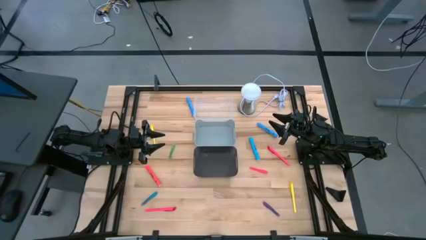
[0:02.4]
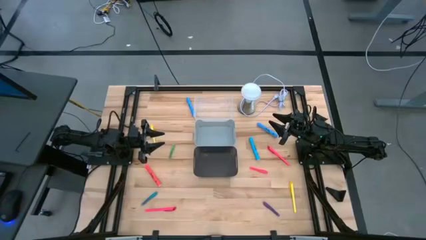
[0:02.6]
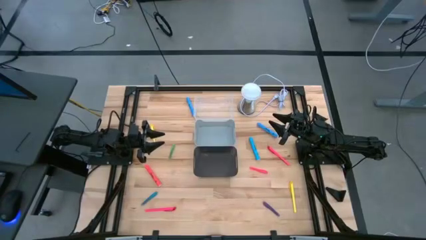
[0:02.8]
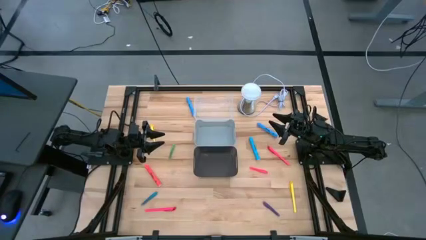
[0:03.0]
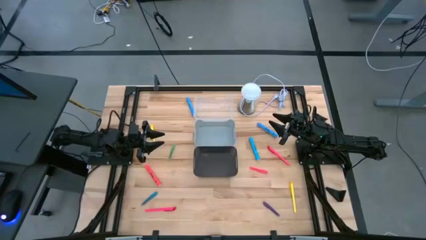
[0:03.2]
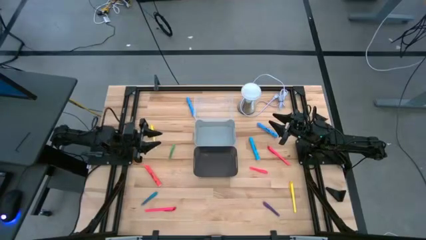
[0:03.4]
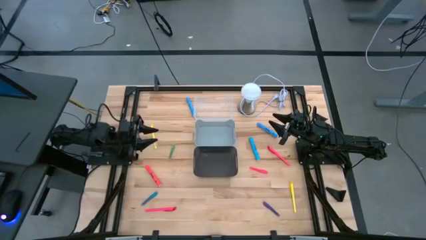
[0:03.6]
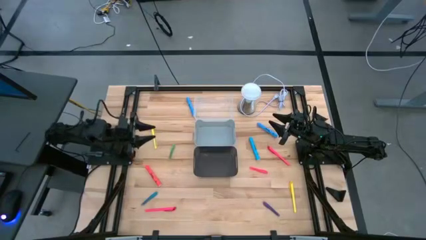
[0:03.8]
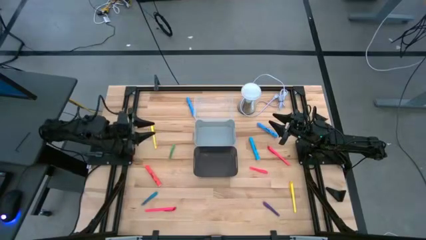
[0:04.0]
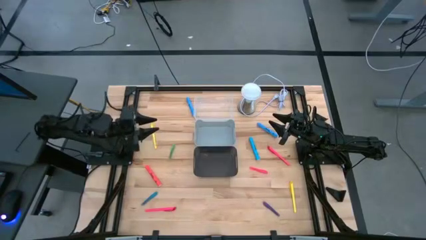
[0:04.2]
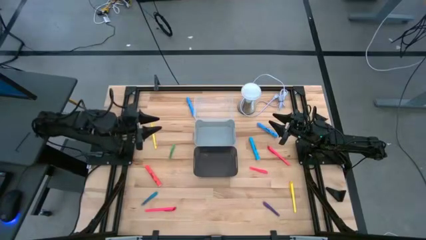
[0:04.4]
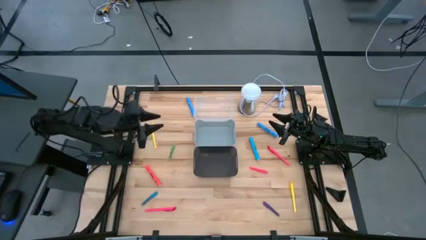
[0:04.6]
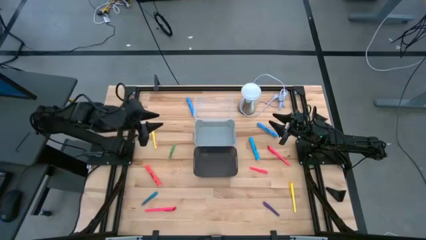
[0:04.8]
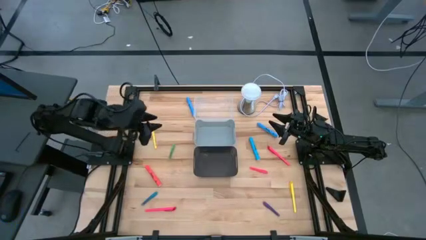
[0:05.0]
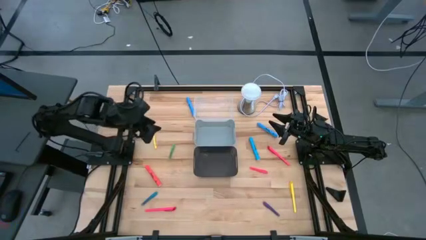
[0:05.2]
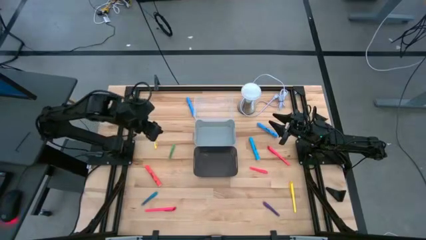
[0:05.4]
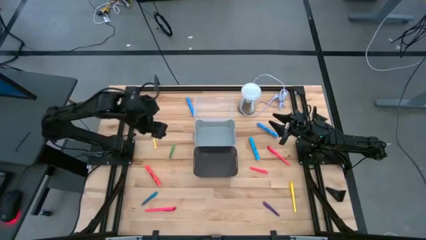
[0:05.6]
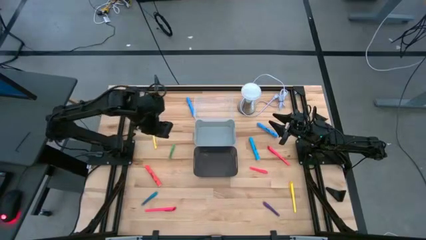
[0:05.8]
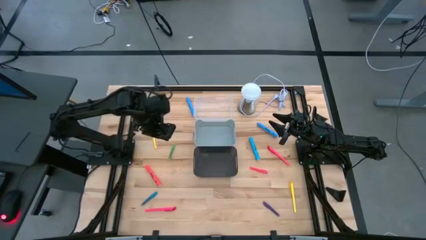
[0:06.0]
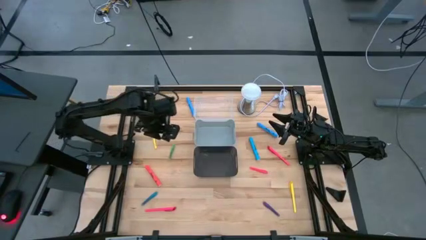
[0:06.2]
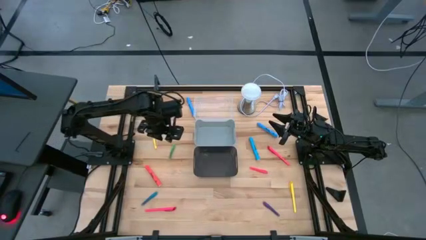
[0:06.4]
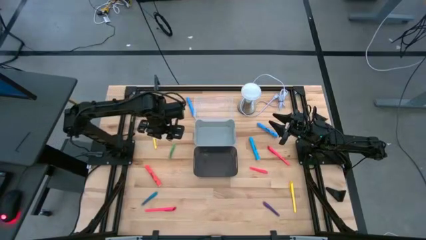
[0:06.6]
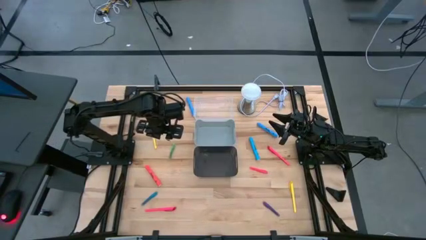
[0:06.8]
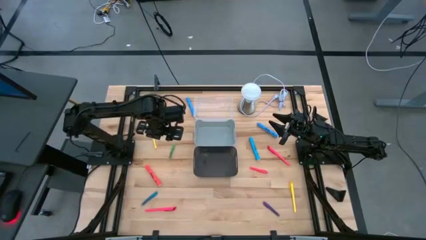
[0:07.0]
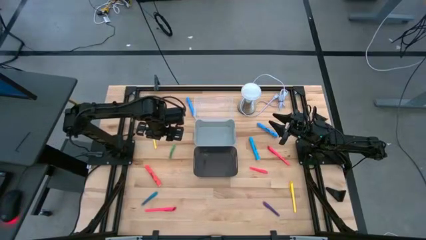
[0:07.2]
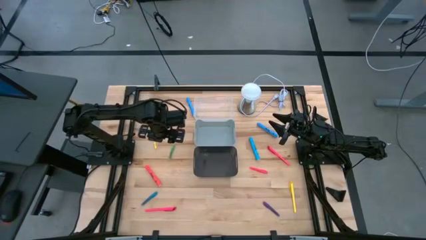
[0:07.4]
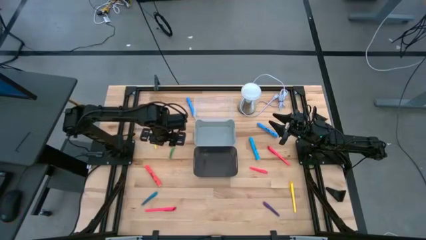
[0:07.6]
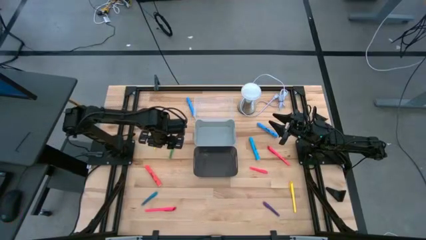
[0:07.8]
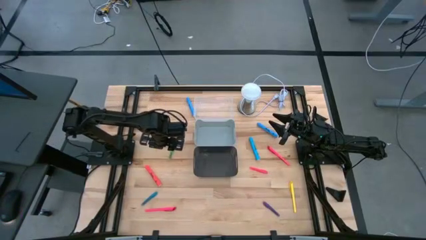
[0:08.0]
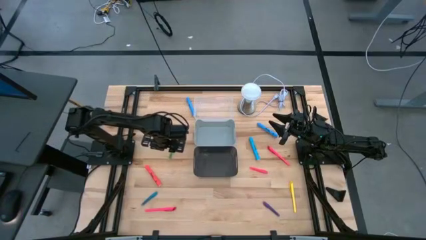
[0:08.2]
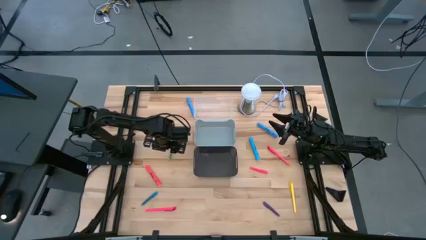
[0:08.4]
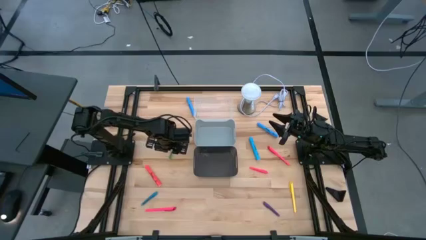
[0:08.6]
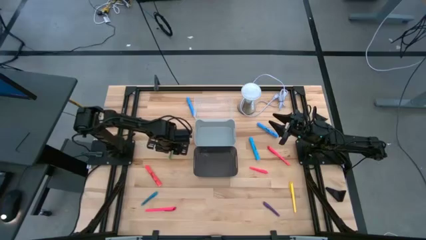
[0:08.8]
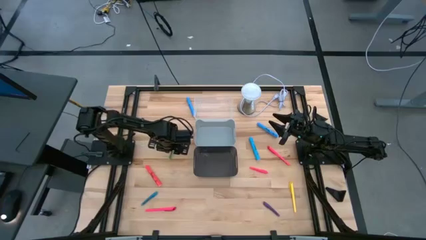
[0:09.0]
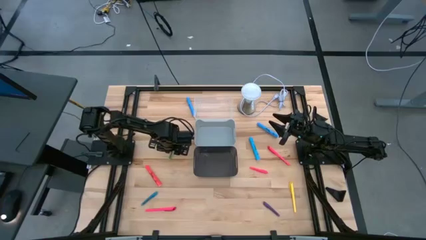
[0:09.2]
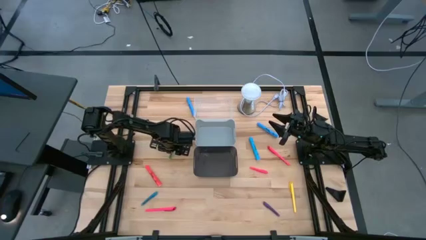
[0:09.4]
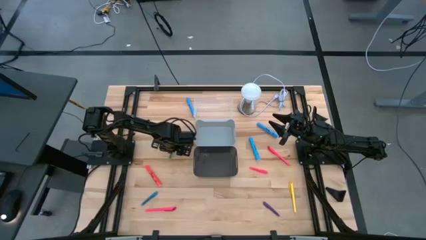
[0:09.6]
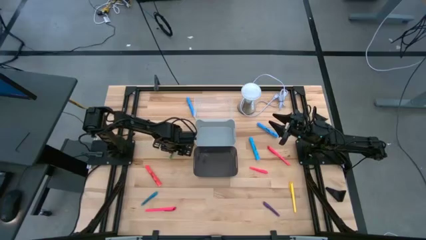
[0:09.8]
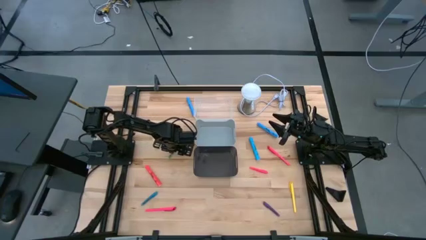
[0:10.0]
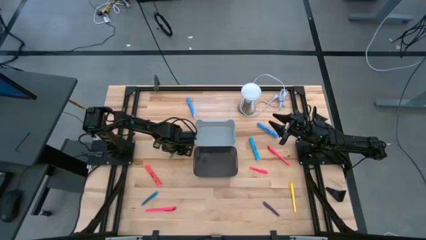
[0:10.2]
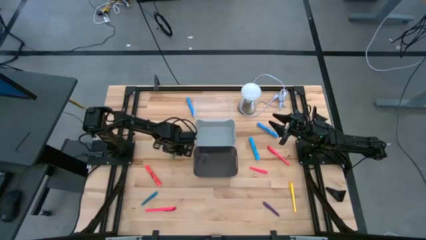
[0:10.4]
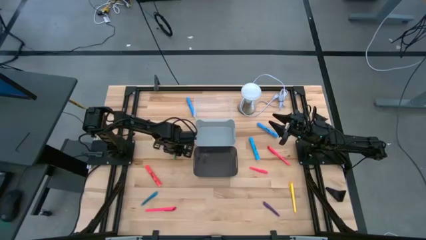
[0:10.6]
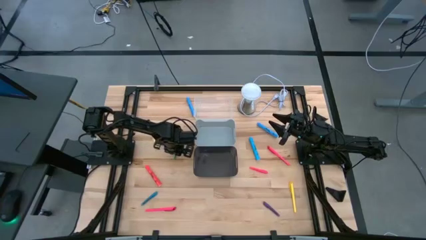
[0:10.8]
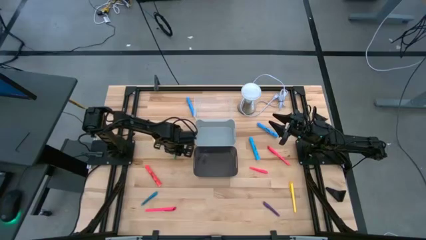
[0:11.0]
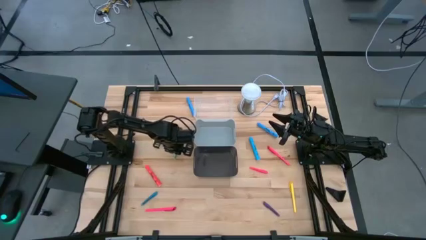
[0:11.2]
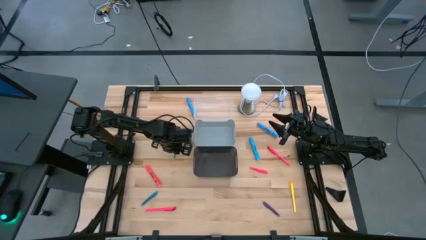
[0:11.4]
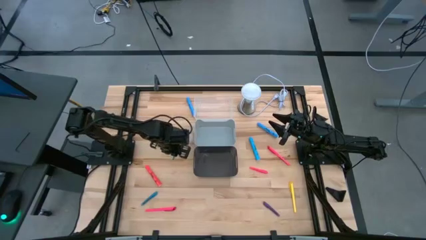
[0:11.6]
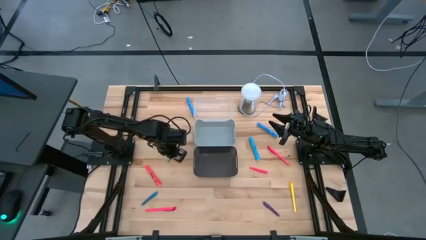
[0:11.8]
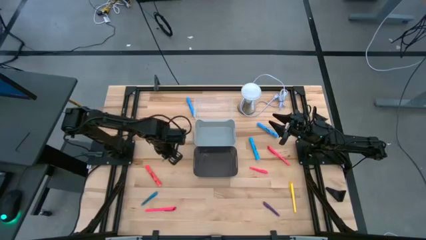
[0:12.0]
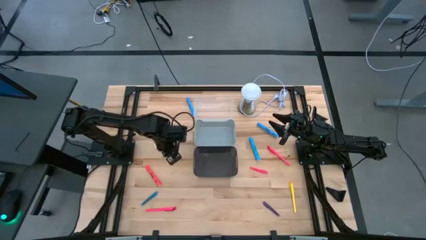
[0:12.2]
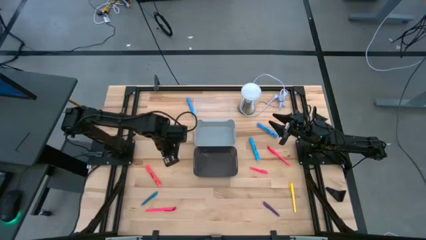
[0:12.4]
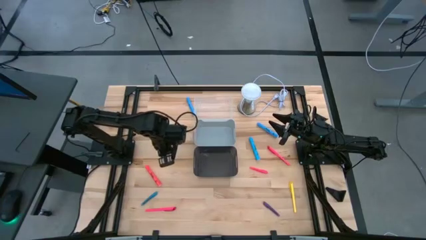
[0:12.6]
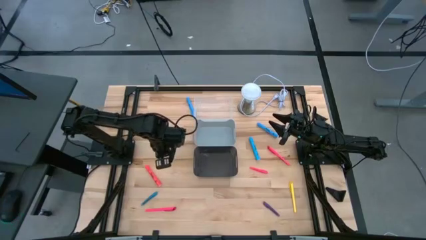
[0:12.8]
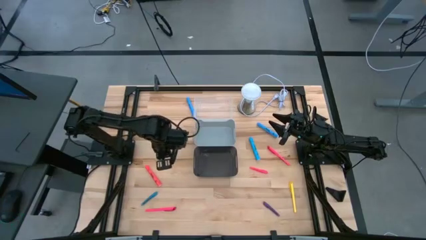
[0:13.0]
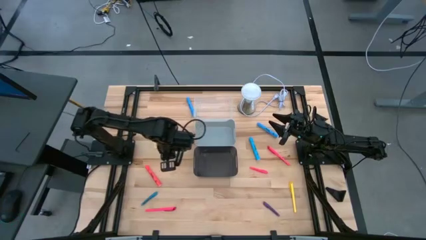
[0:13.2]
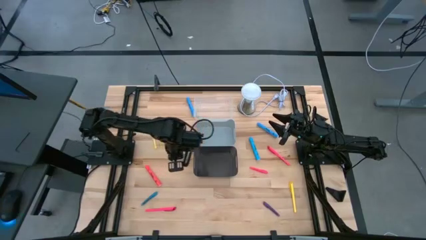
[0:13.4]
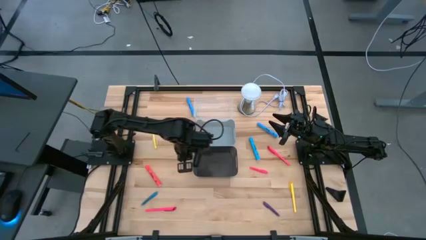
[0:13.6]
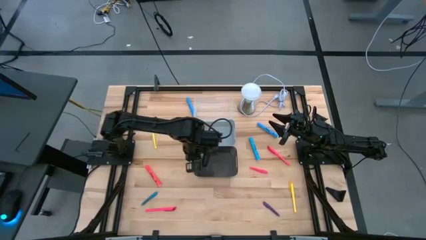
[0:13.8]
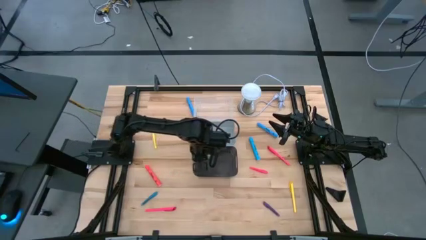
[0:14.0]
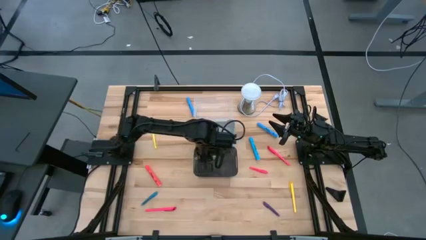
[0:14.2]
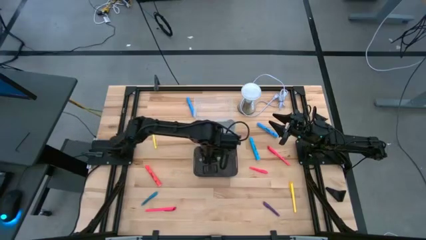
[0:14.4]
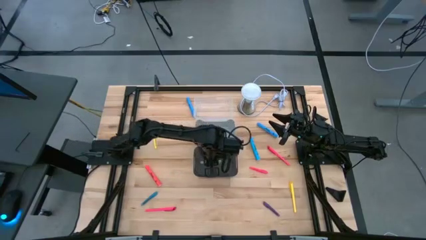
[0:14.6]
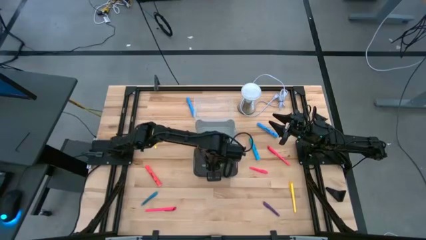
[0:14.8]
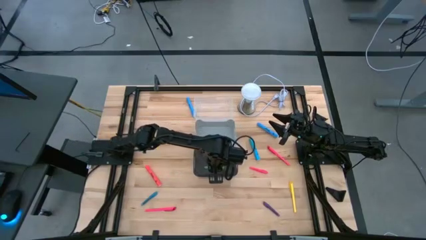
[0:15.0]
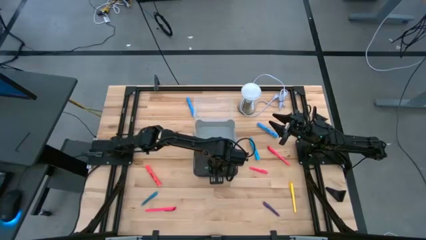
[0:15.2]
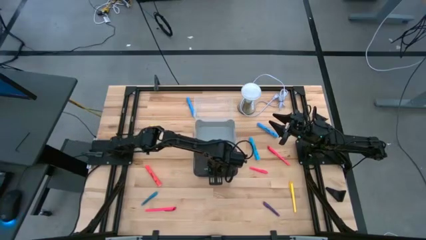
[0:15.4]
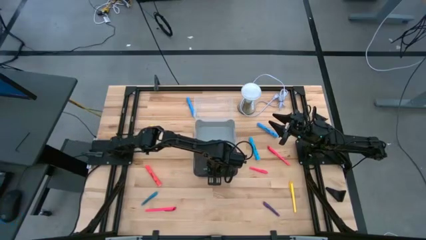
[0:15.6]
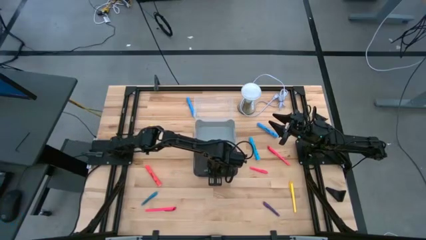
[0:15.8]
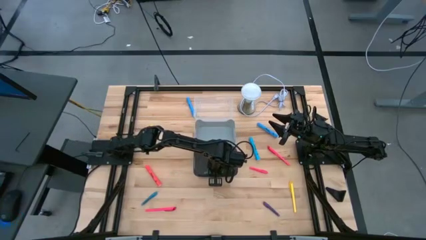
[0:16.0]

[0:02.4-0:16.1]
Task: Pick & Place Markers
Put the green pen into the black bin
